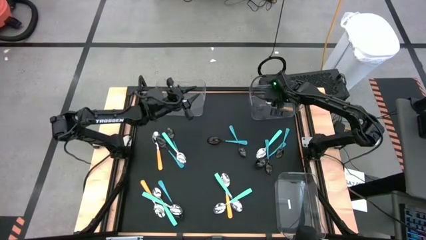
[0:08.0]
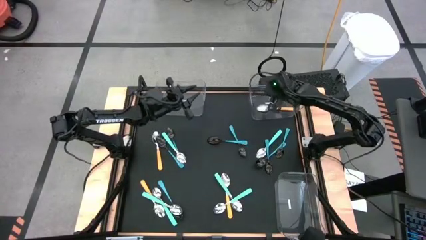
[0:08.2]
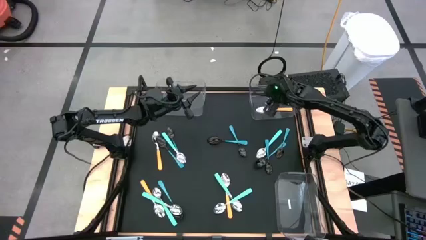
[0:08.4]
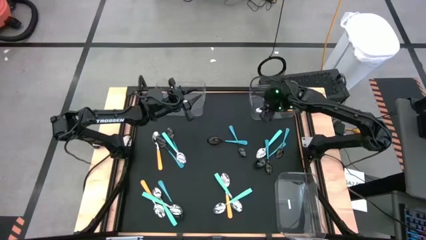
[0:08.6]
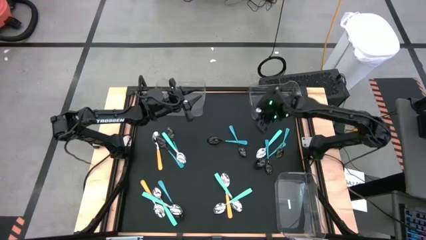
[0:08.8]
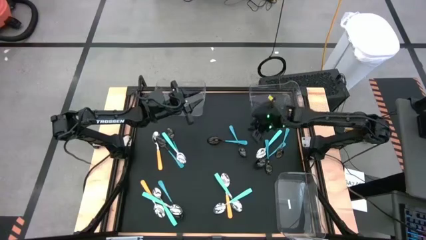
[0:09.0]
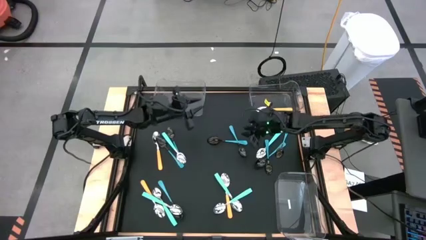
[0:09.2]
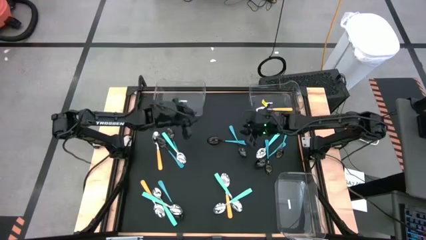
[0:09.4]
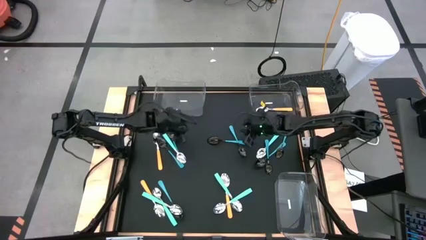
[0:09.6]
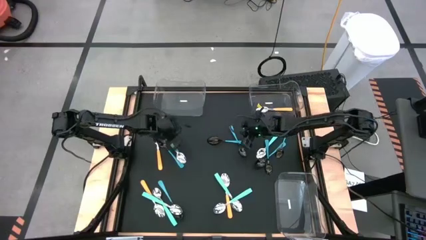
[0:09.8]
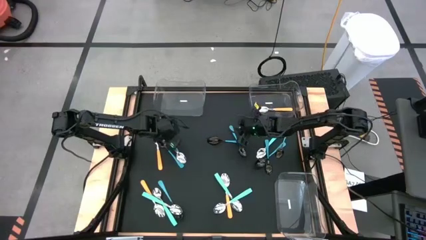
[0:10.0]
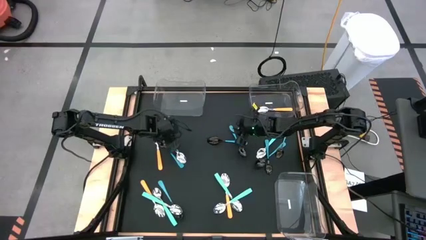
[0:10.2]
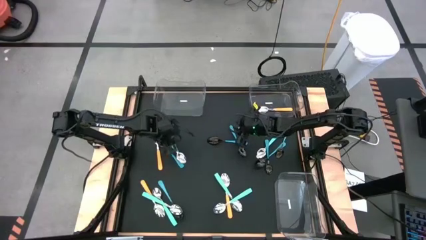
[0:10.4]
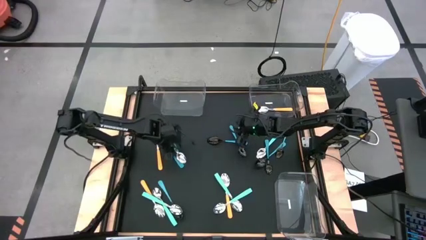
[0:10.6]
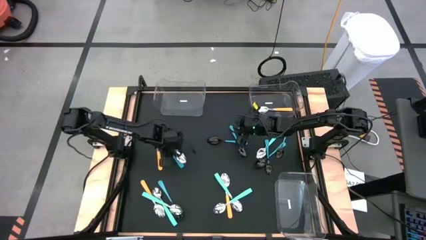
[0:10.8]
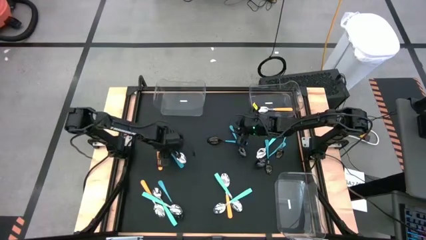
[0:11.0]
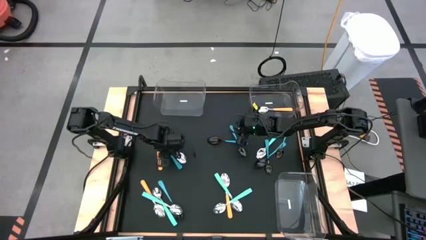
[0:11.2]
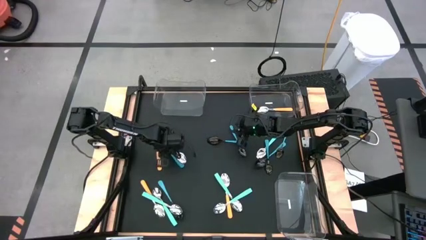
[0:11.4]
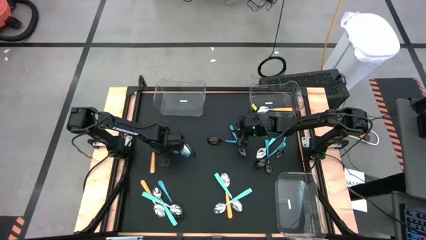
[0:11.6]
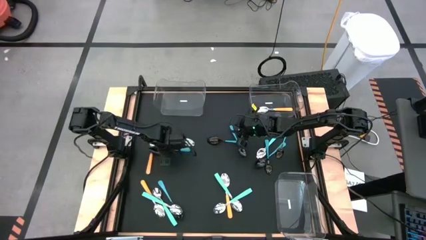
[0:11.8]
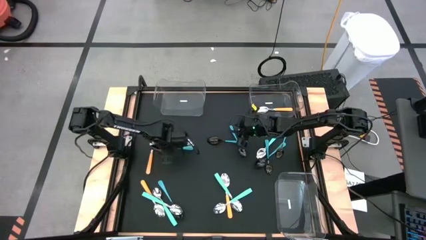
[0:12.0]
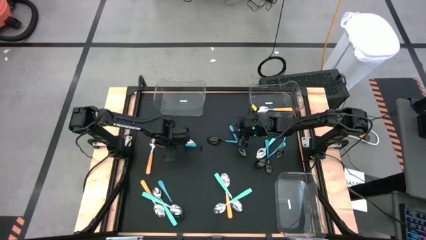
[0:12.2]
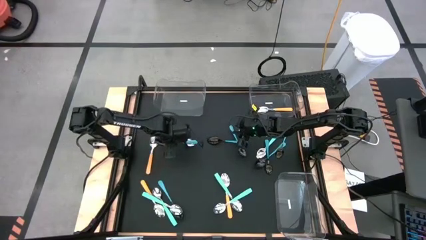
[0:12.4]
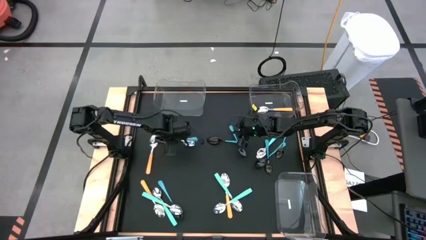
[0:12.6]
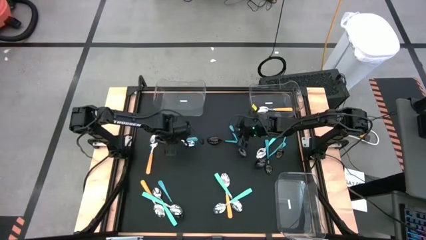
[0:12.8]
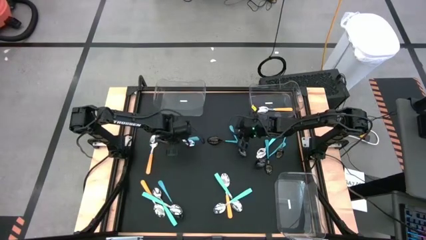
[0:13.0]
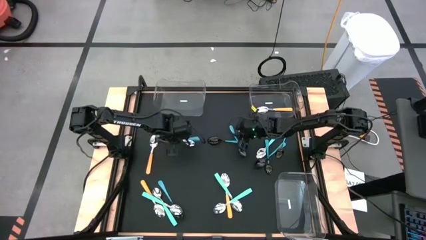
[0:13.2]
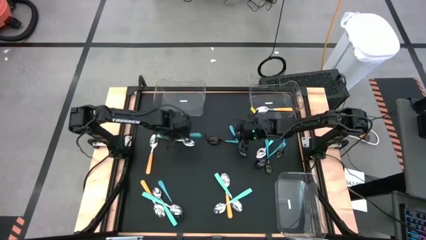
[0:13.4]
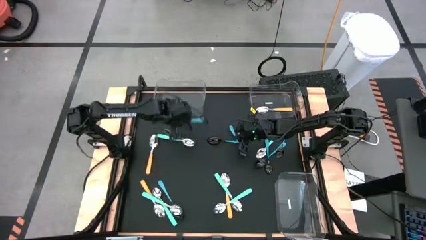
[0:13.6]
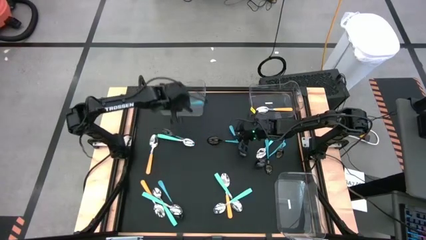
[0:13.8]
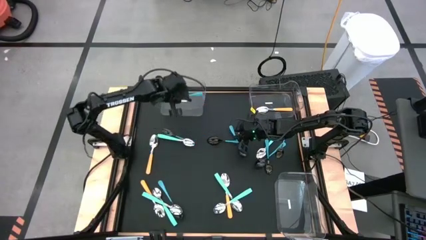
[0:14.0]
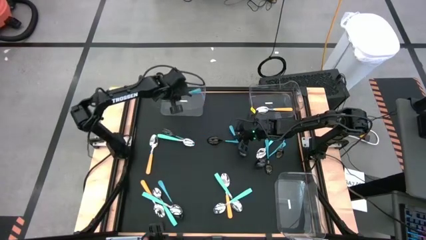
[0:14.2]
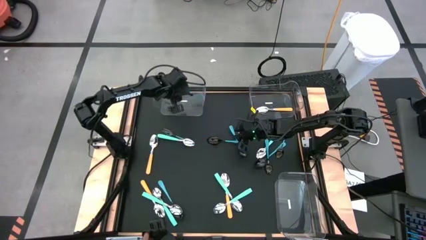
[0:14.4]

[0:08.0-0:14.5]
Task: Sort silverware by color (type)
Put the blue spoon into the top left transparent bin

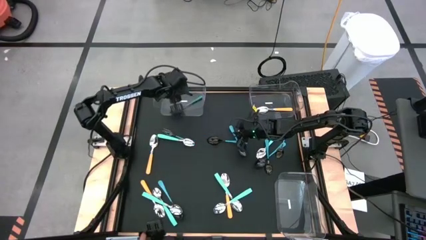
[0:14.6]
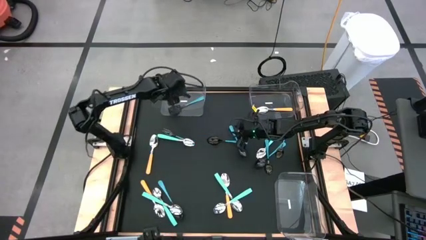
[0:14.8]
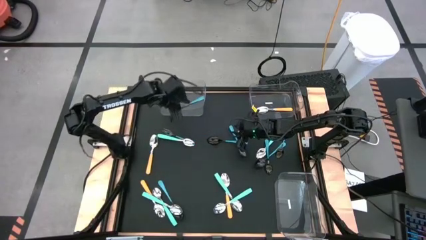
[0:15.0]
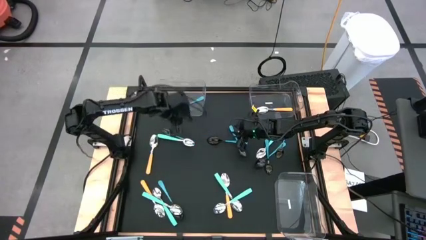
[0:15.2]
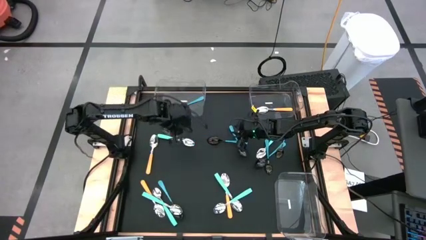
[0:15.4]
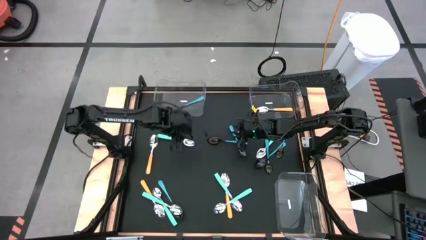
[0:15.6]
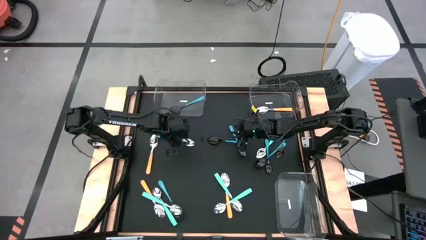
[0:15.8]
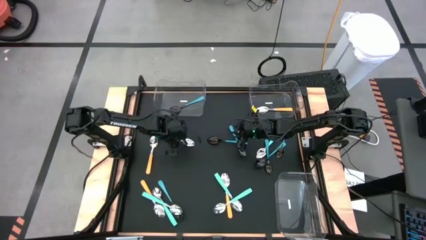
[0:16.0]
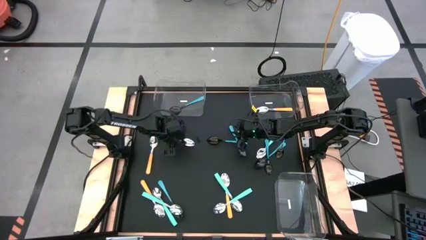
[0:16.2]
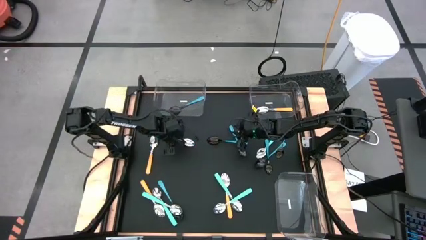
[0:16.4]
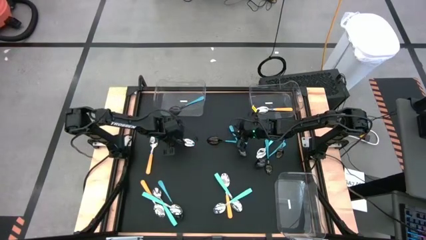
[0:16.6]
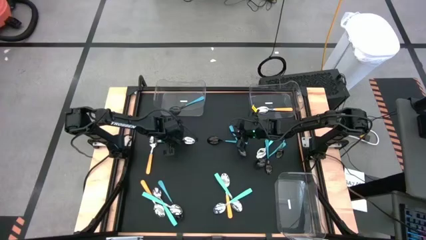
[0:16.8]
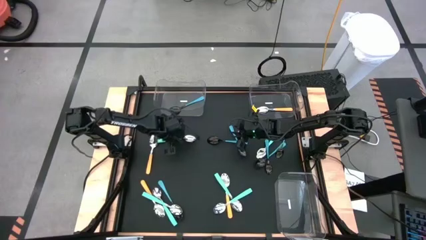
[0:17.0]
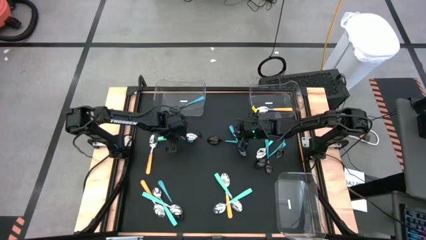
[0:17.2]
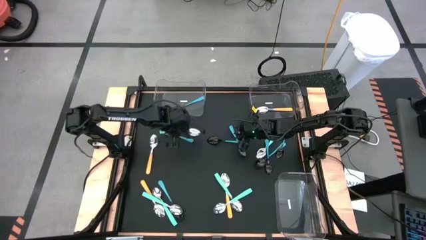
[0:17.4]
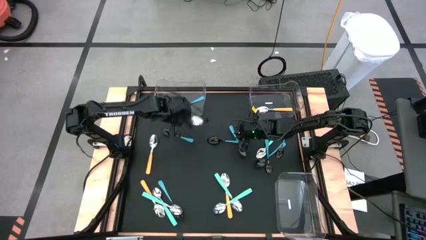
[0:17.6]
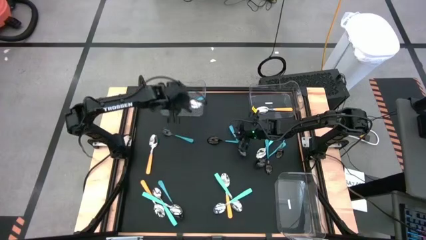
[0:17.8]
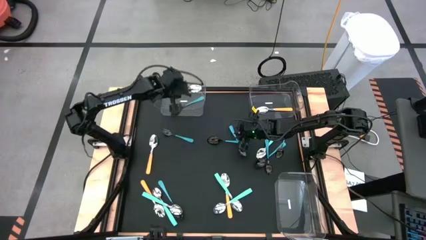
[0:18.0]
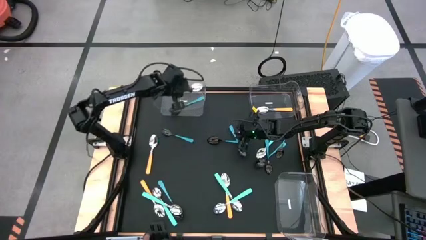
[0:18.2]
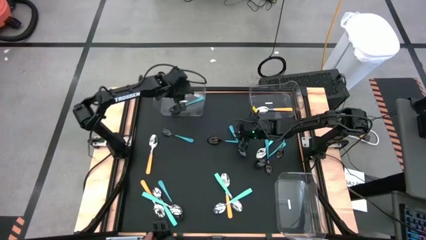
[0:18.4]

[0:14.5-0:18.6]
Put the light blue spoon into the top left transparent bin

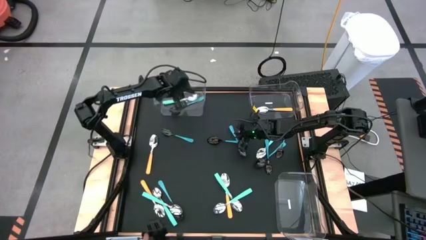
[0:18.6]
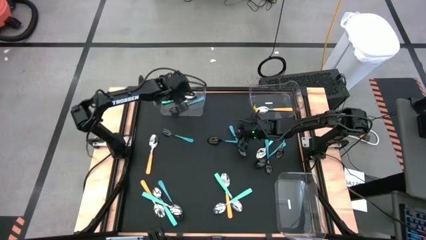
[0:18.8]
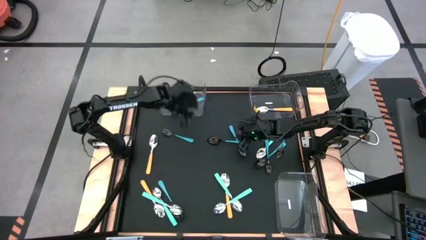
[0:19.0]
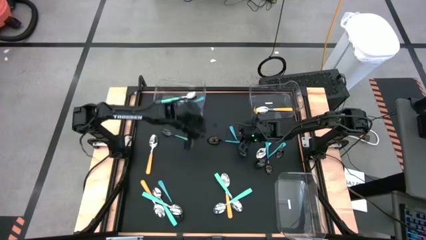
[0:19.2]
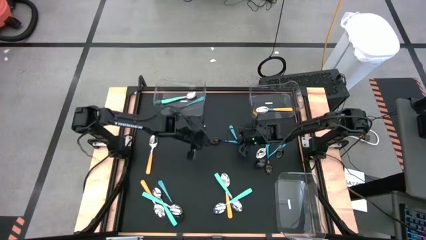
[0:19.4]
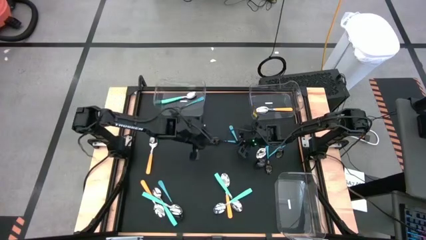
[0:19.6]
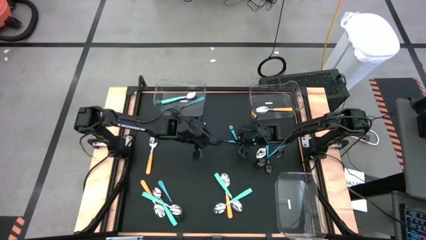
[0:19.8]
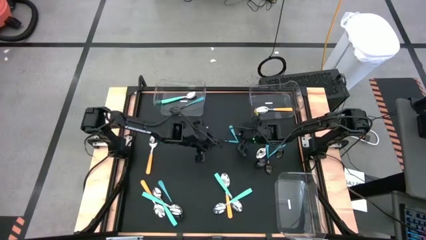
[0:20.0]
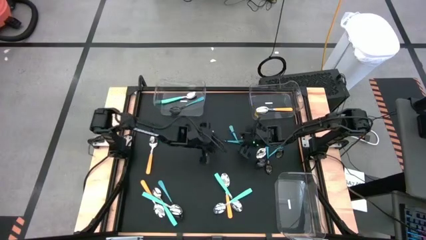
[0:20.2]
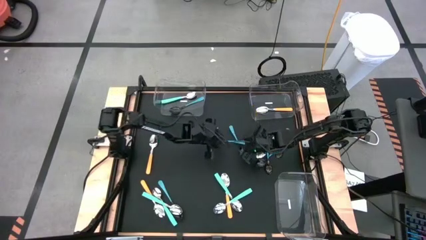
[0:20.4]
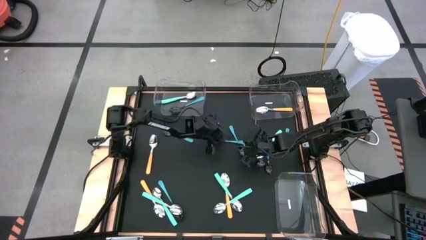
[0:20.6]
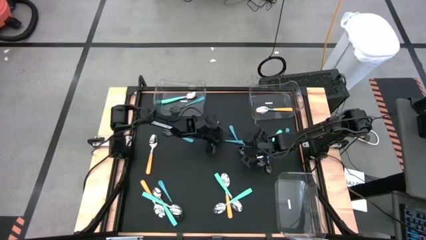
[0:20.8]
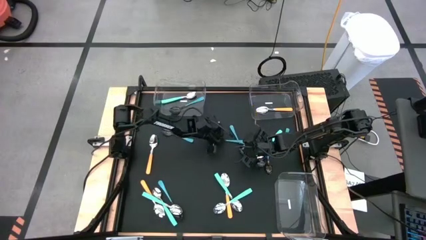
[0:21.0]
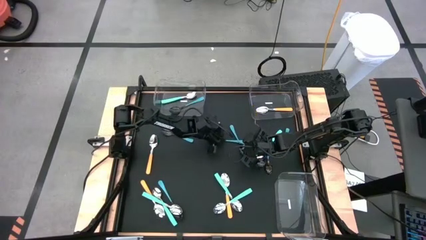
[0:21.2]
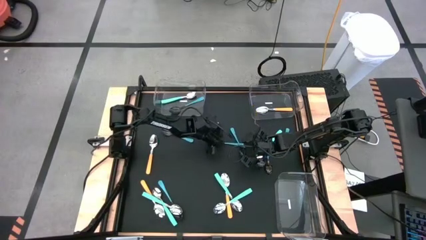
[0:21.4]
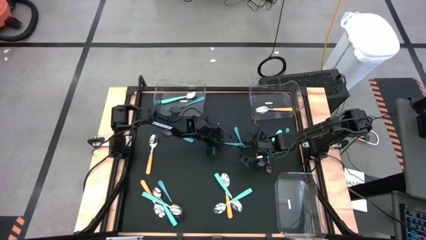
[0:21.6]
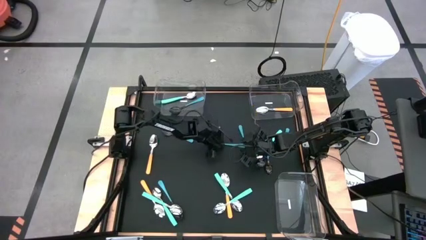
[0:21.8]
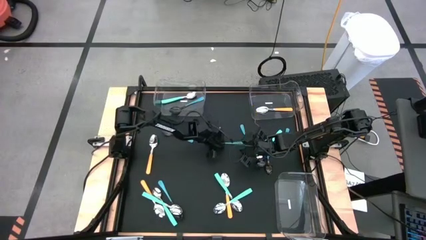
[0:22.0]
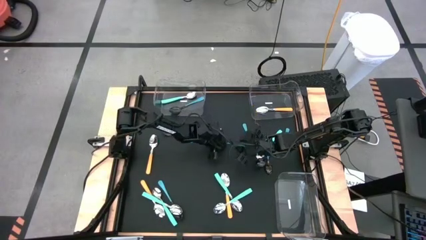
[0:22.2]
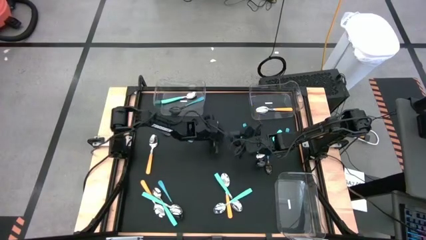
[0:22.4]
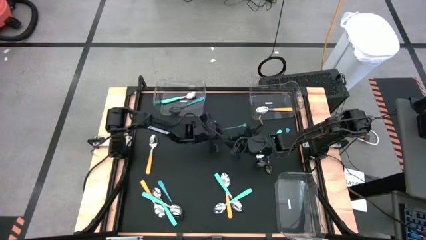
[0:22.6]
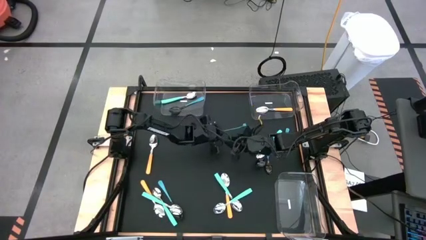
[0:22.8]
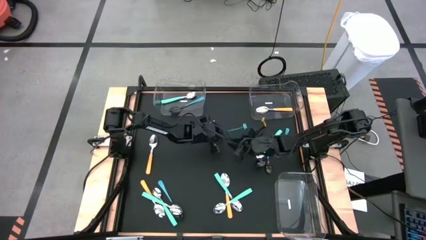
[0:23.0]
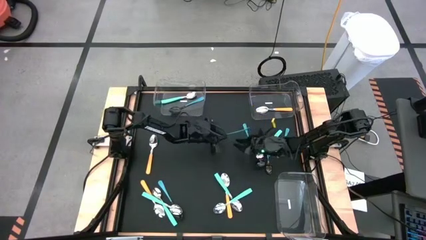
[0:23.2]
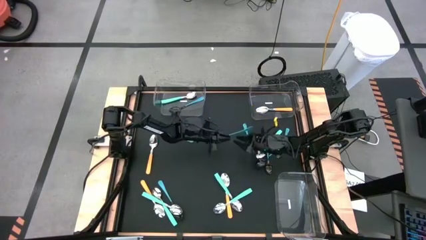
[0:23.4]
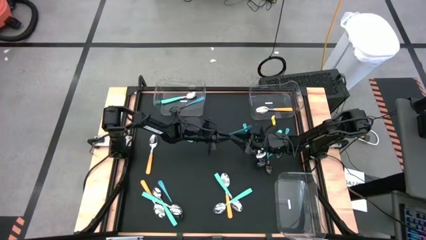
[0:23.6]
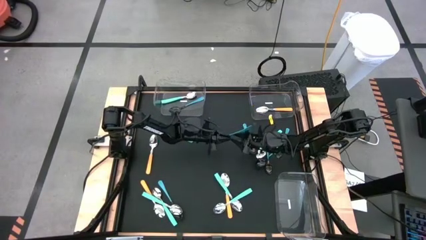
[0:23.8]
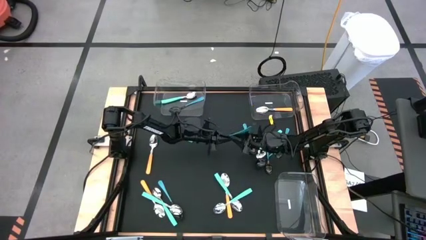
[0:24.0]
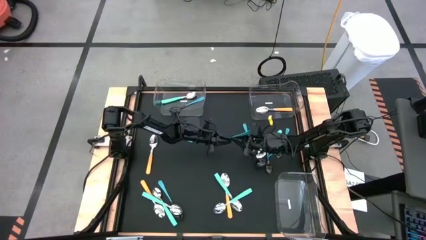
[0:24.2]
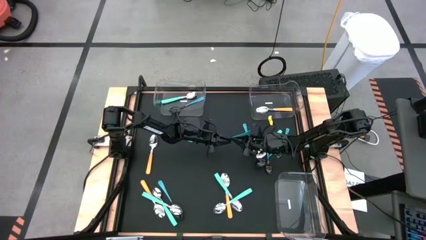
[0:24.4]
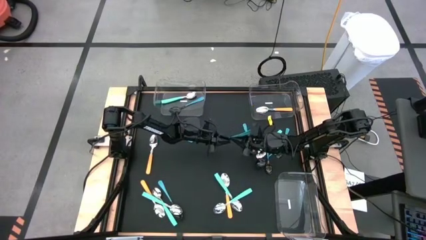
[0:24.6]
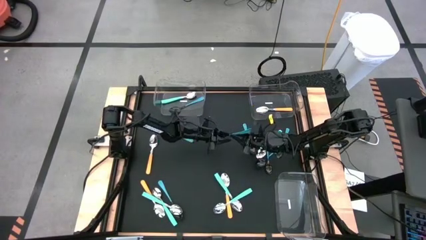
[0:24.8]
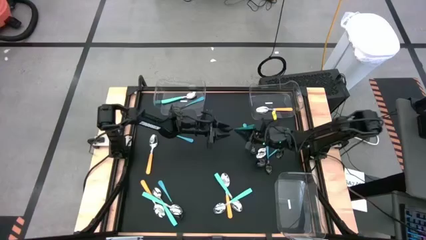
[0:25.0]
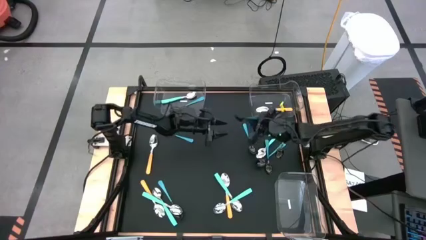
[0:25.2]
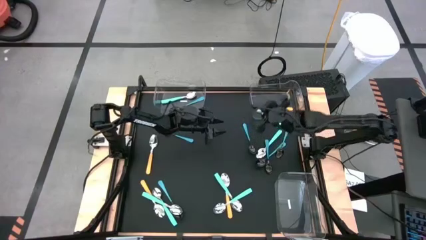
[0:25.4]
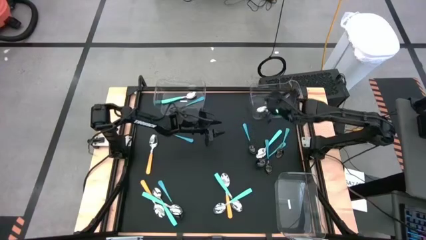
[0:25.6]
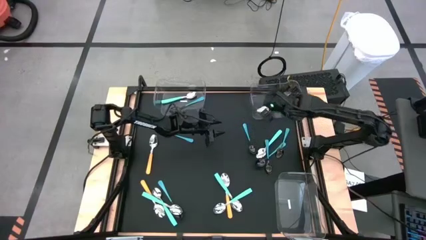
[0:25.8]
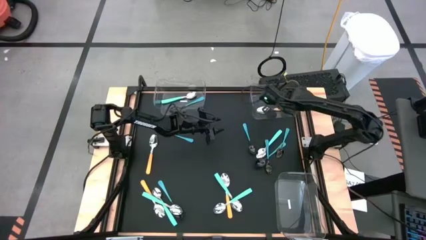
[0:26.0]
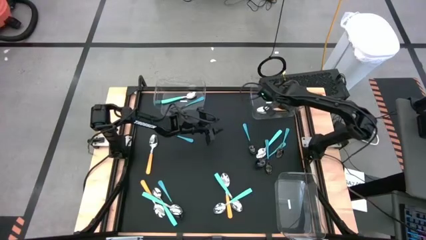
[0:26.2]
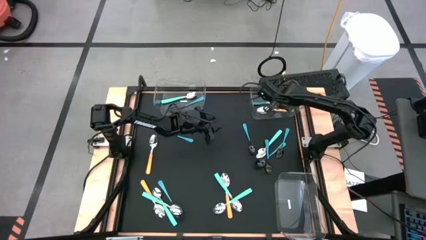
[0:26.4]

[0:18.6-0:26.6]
Put the blue spoon into the top right transparent bin
